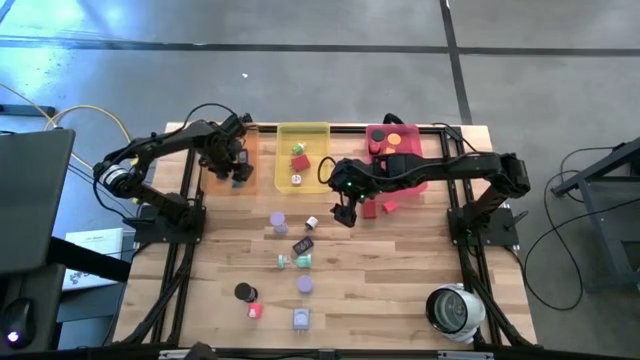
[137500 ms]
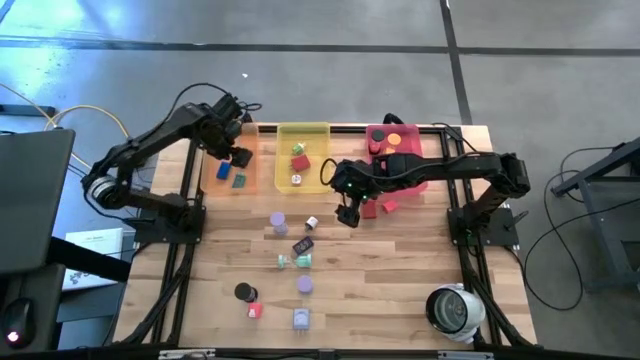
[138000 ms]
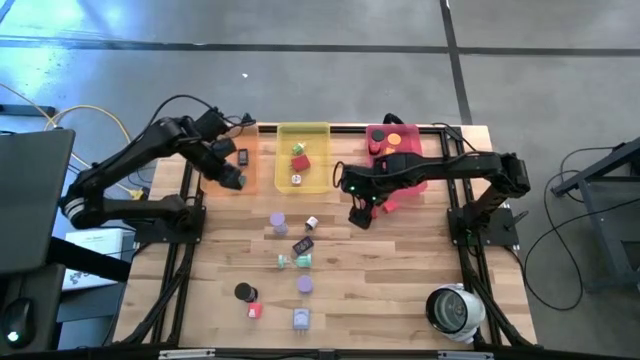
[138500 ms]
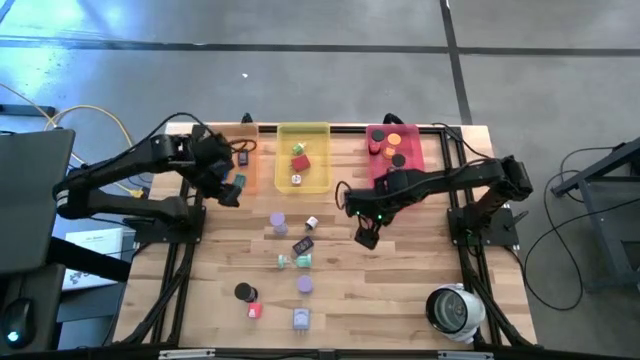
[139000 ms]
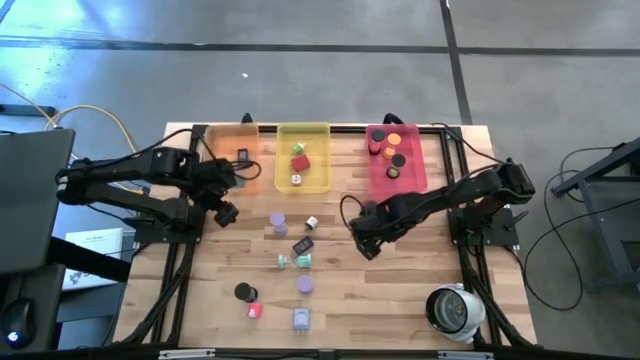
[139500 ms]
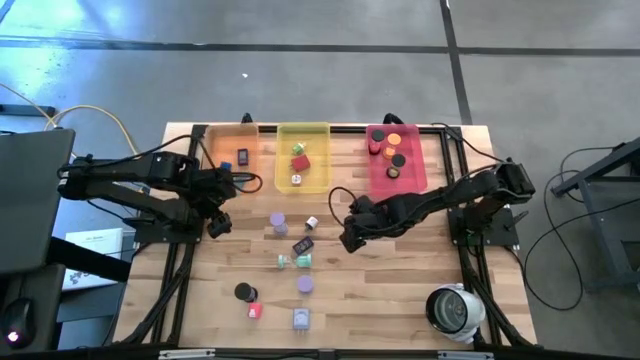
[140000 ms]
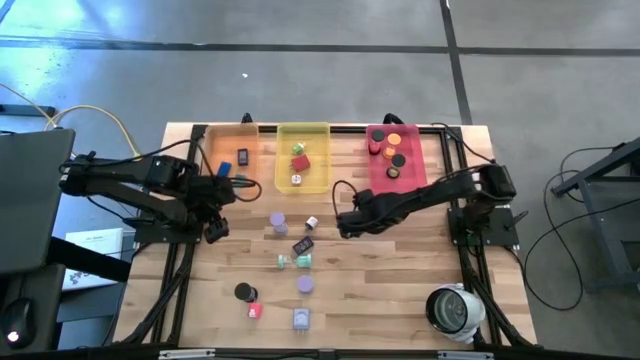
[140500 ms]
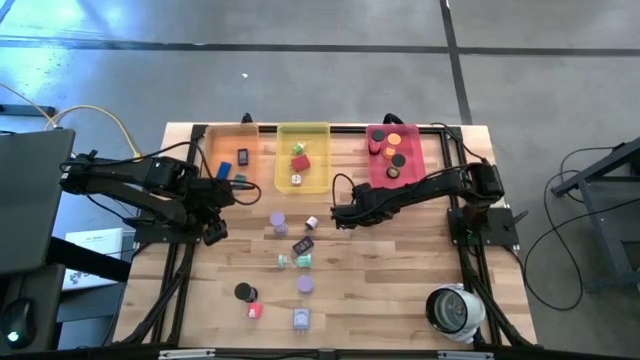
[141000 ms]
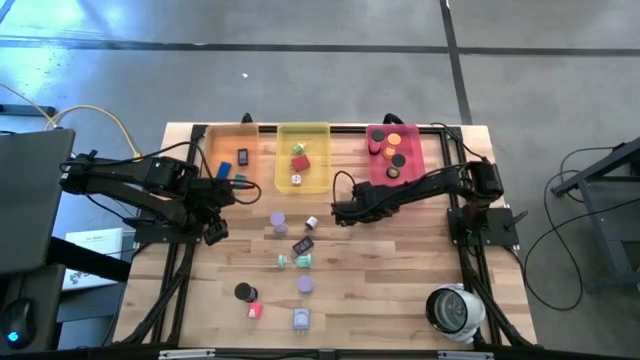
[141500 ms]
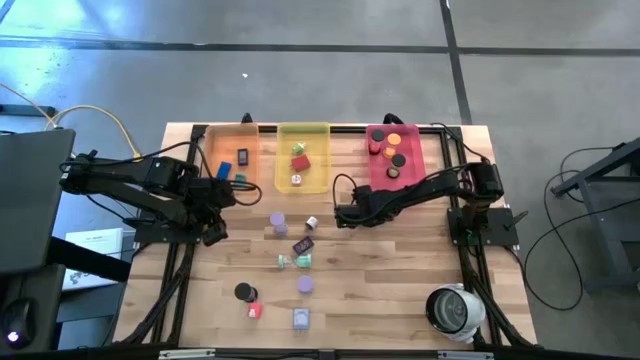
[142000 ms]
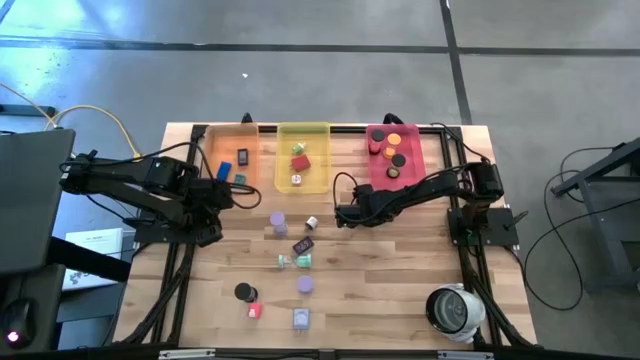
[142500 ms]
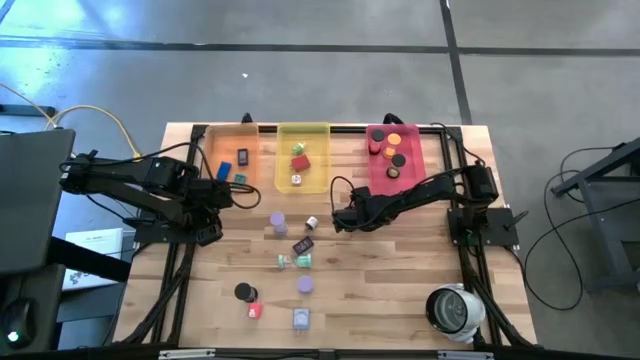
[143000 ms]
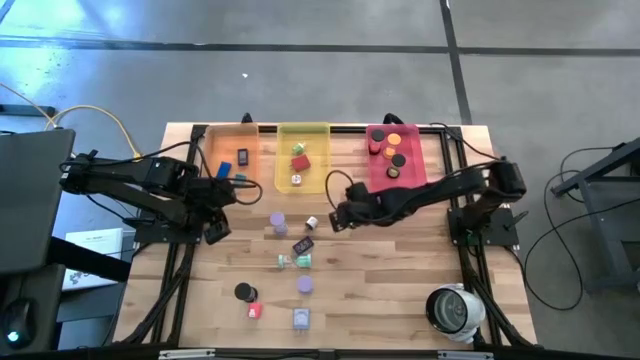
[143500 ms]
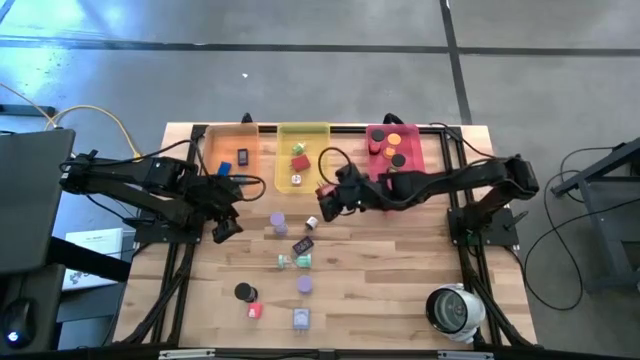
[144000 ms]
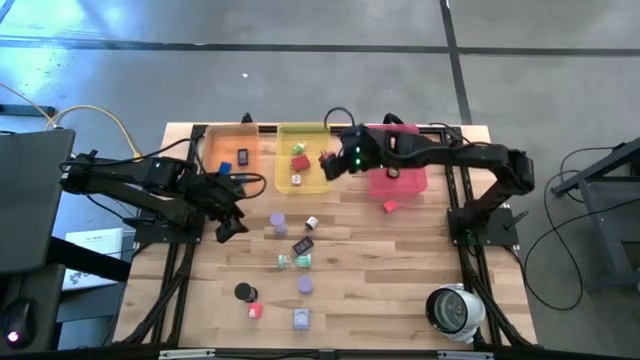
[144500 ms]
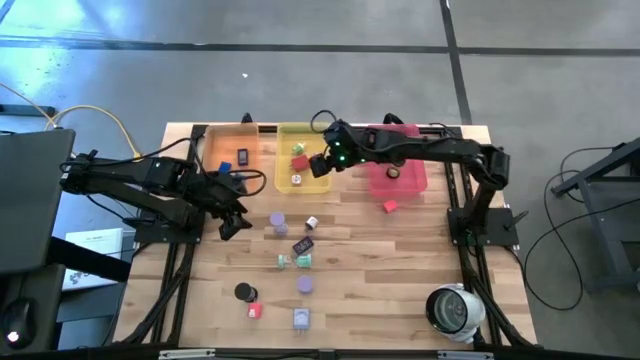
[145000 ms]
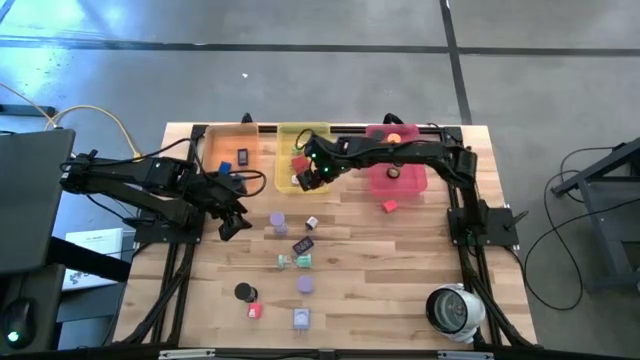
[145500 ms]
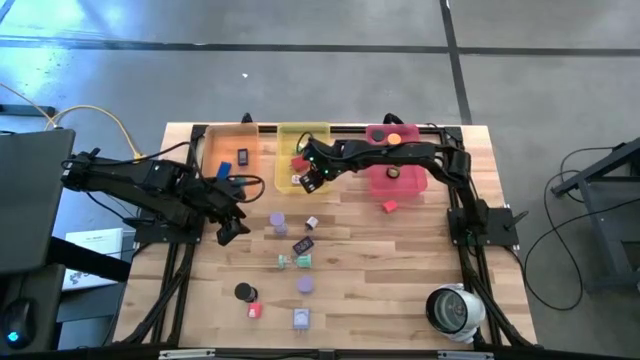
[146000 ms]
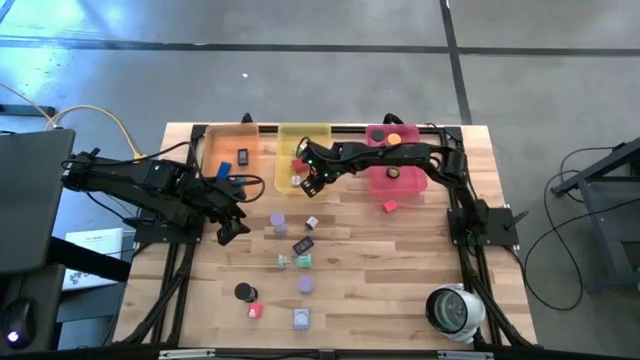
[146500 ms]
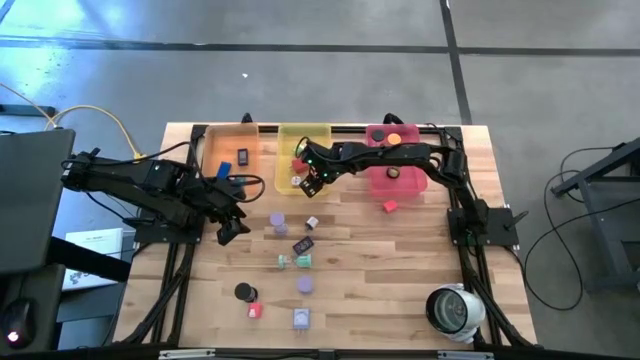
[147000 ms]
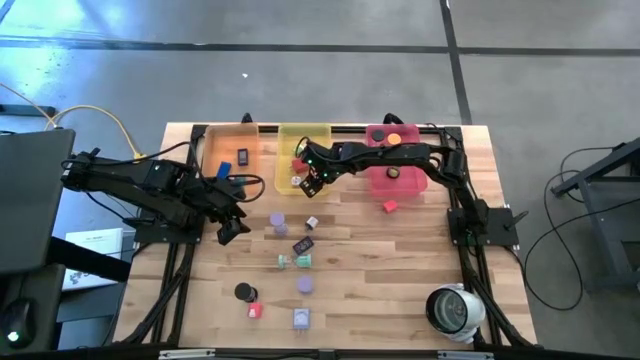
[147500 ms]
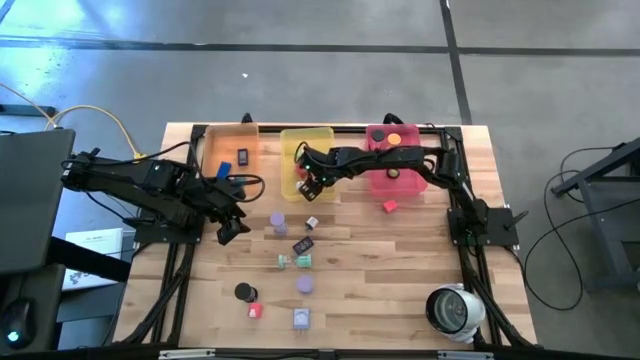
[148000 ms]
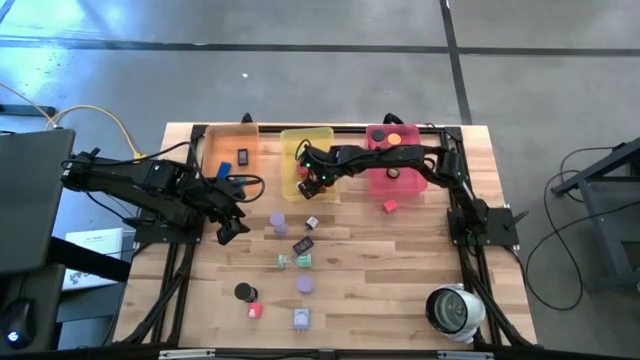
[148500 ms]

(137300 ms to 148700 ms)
Task: Pick & Place Office items
Put the red charger adapter into the yellow bin
